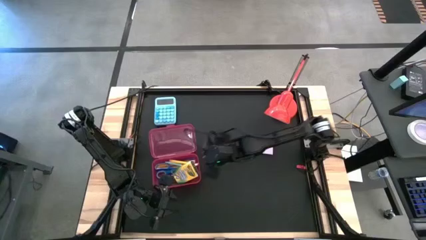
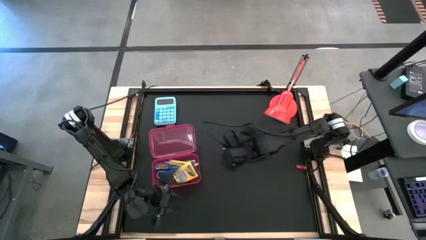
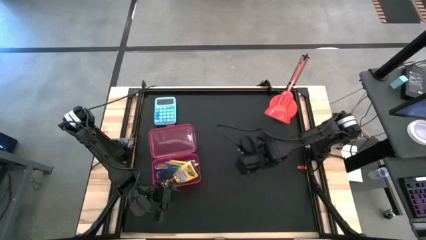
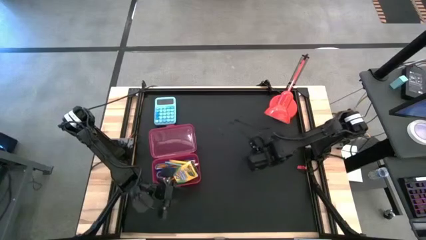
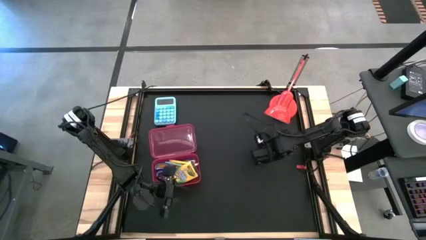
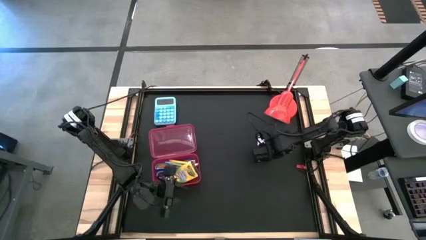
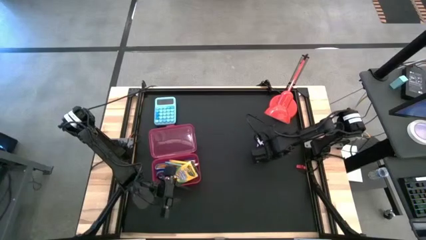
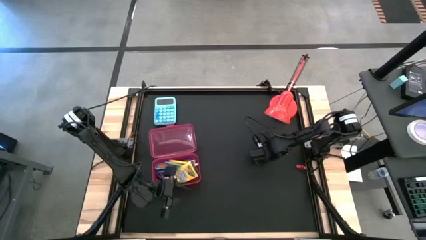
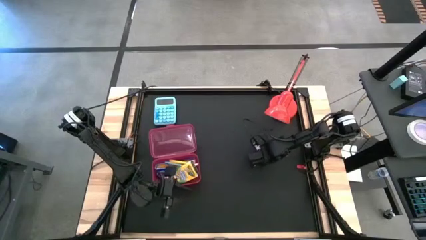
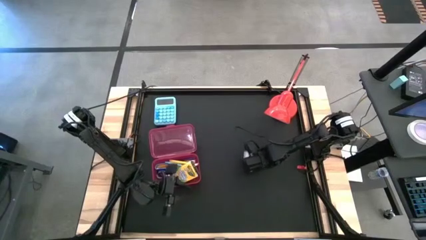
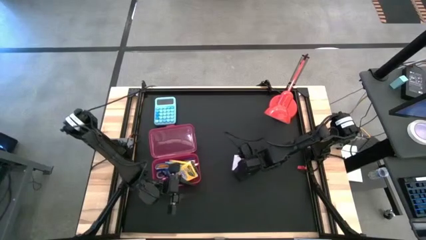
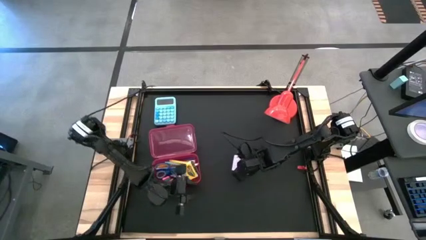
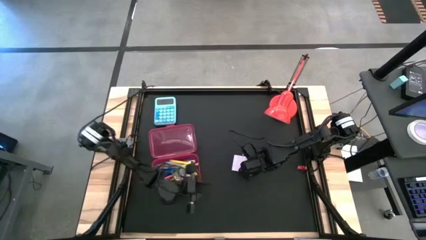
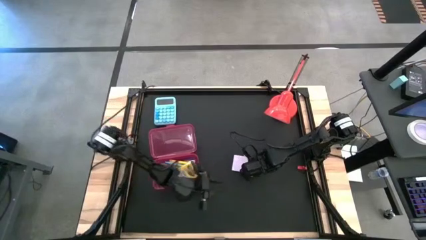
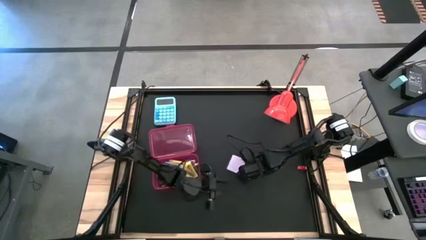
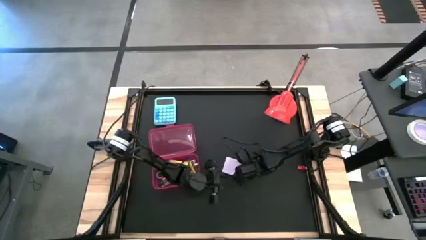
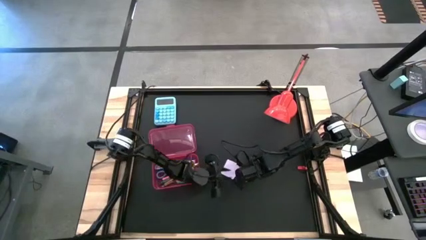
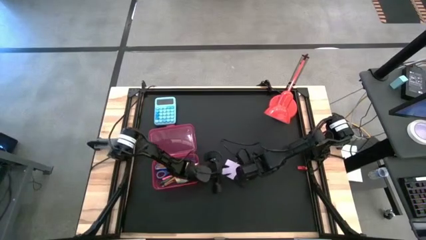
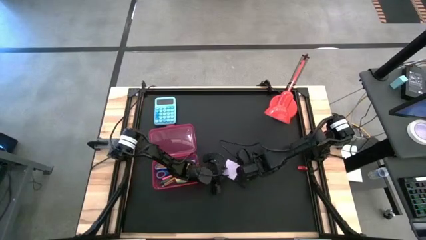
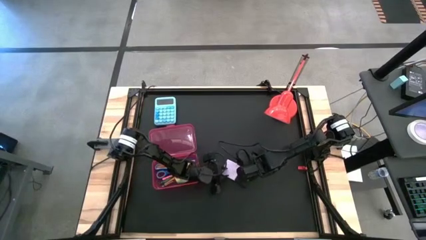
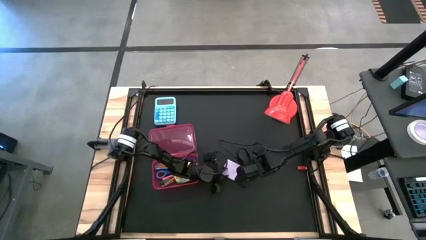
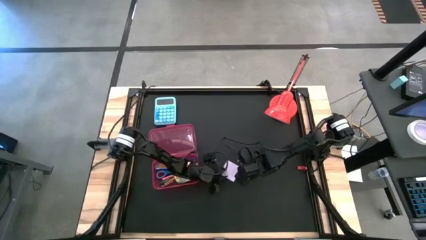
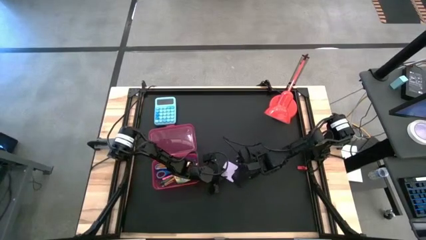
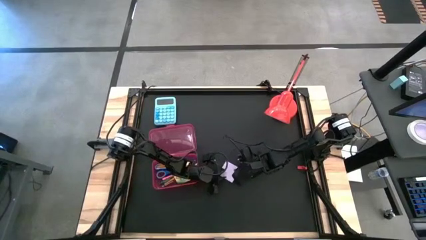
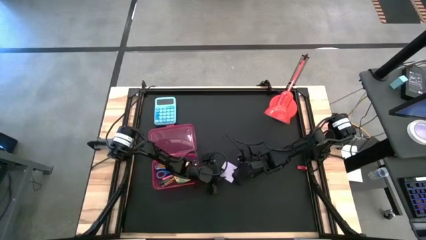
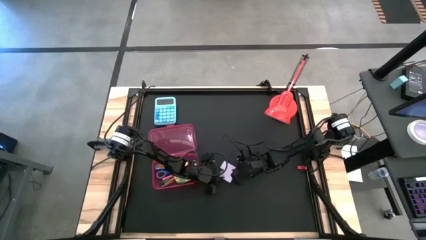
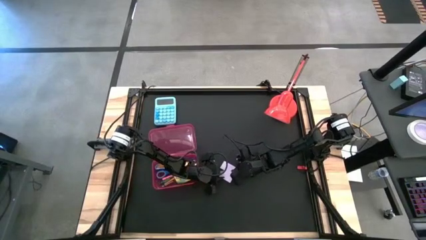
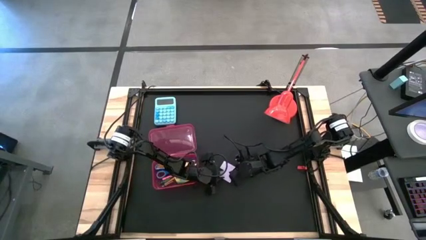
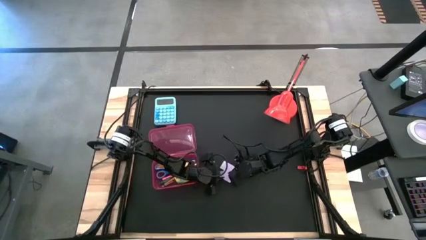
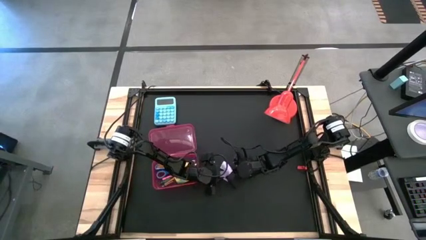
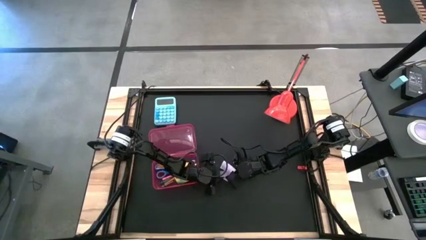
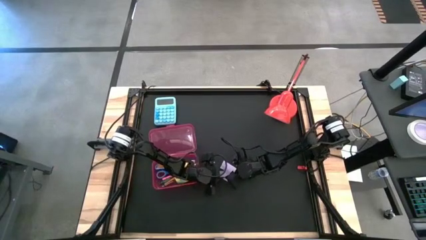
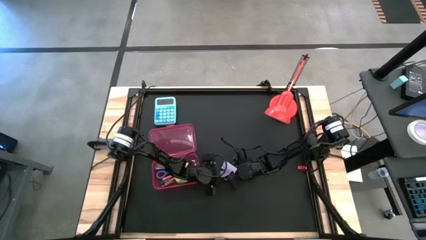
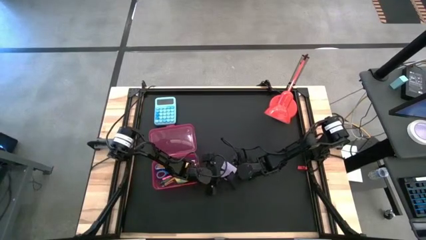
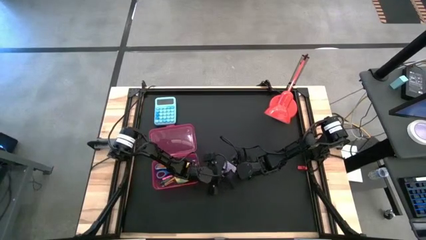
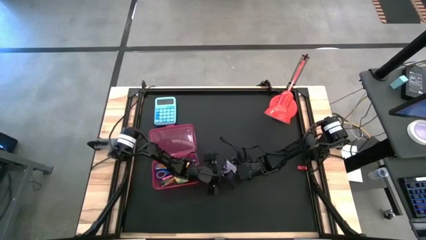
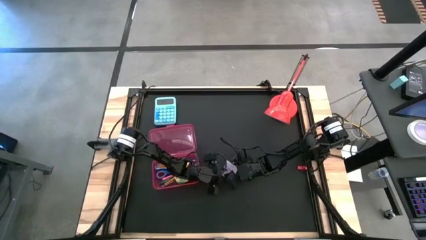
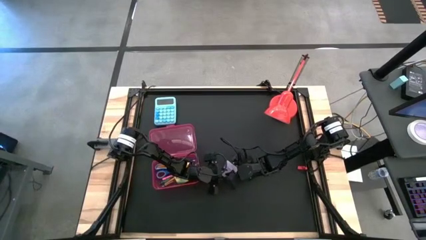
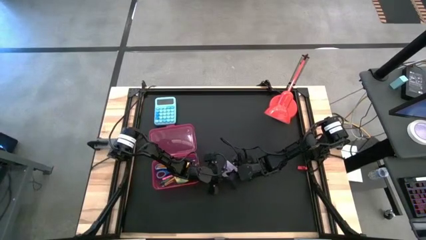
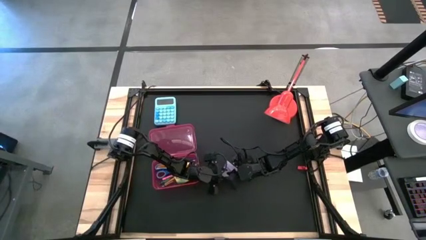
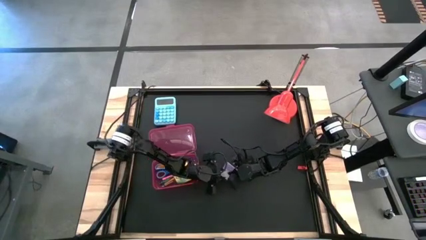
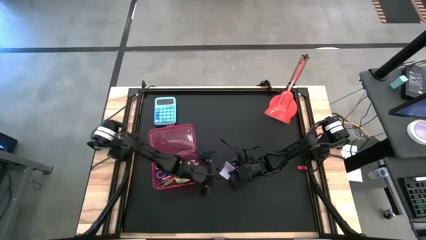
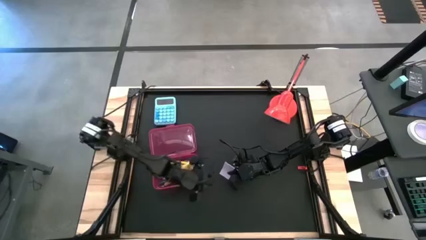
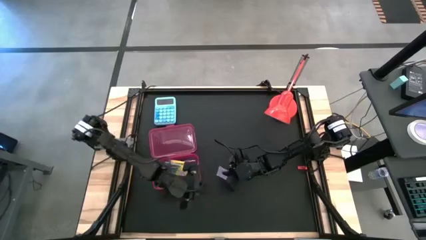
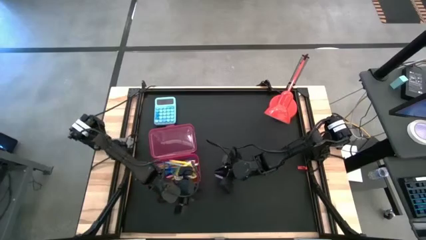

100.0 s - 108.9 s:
Task: Pack school essentials
Put the white sticky notes into the pink supply box

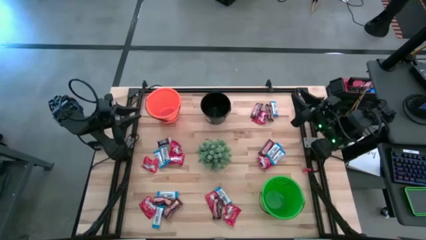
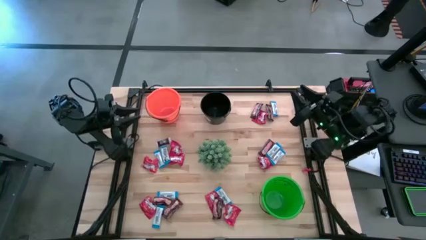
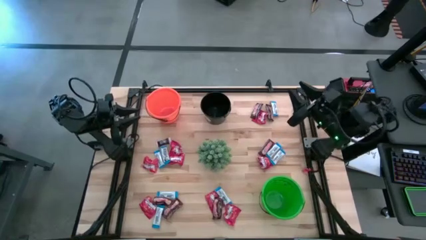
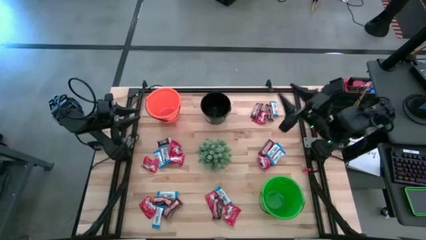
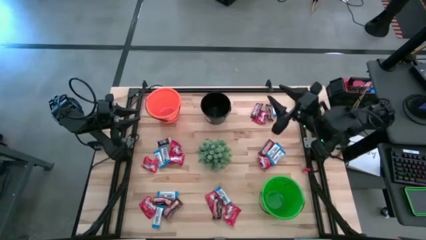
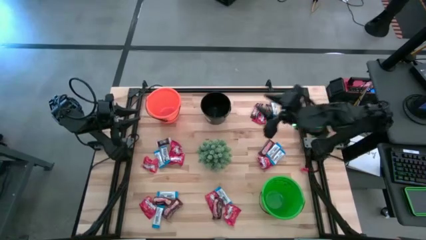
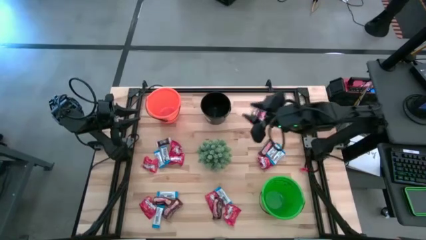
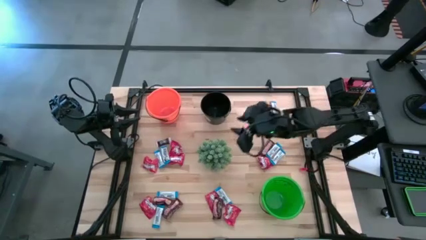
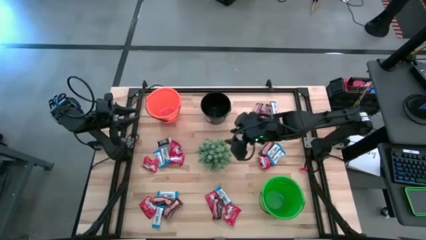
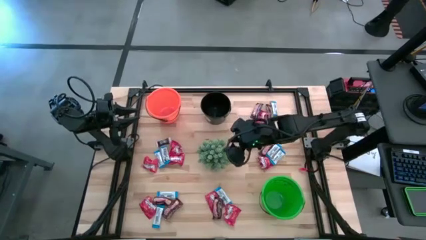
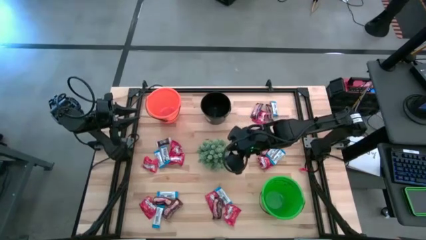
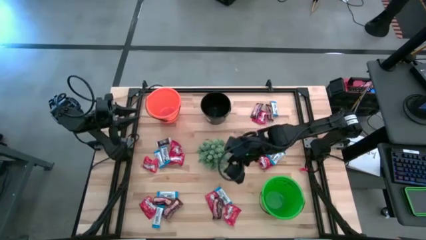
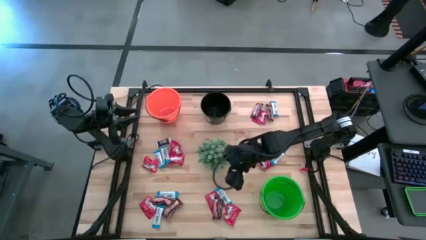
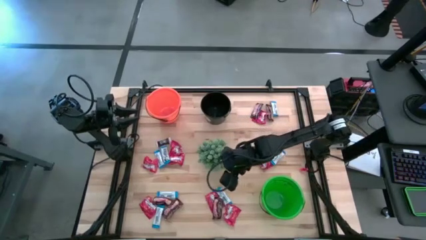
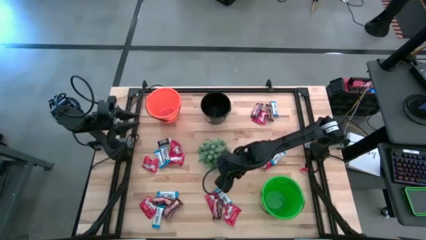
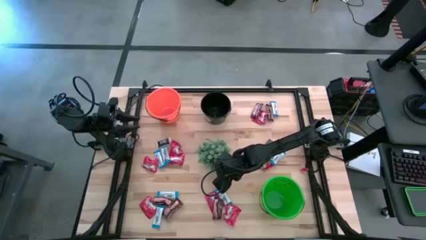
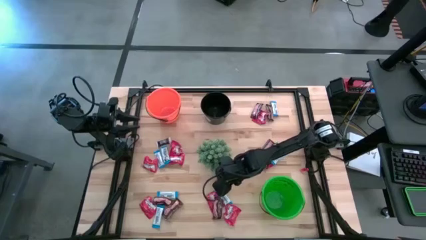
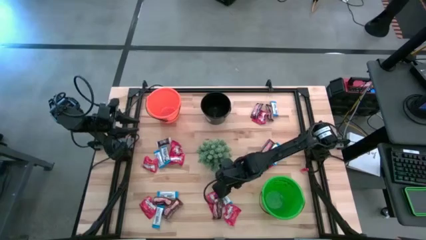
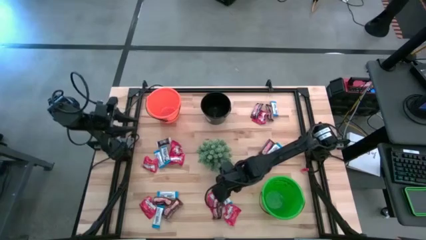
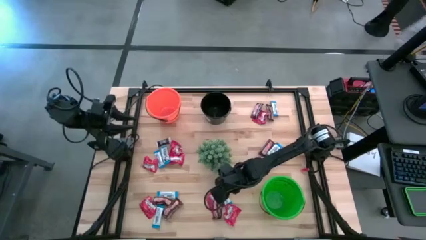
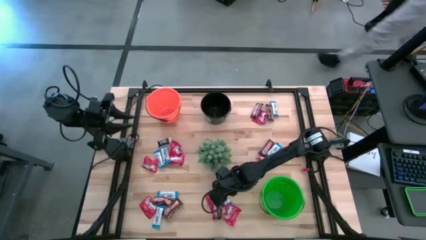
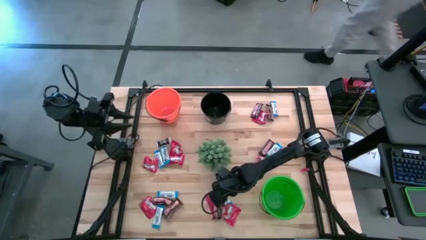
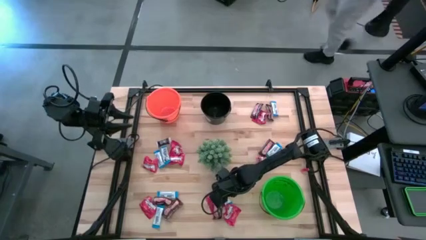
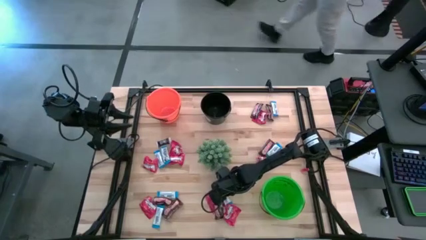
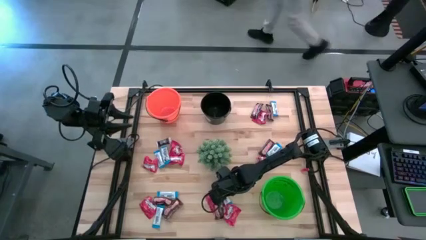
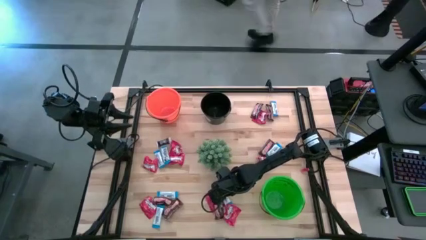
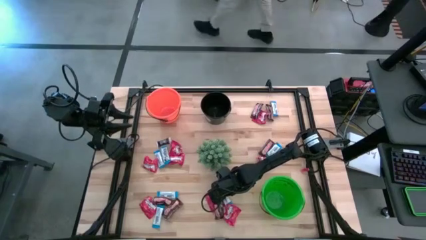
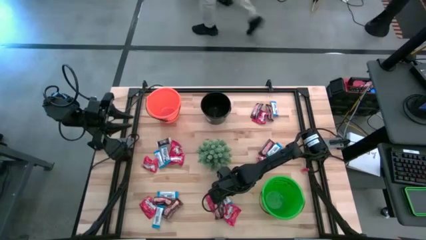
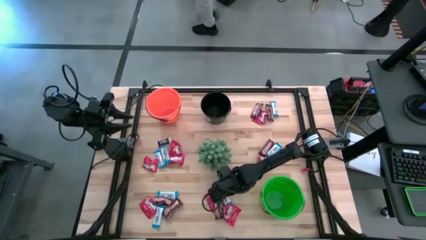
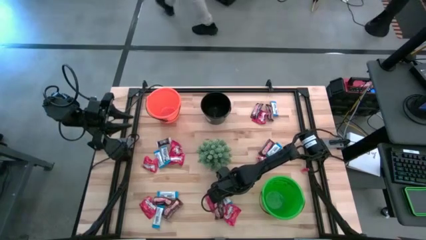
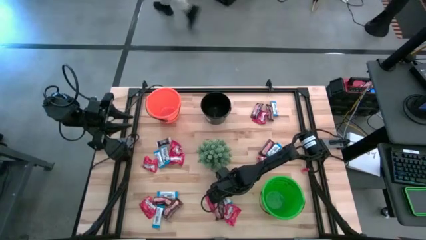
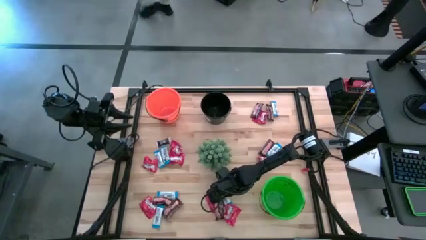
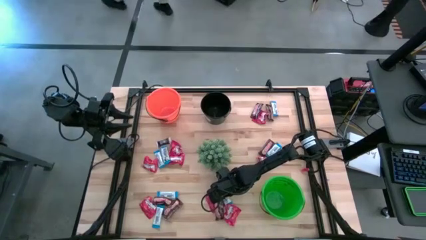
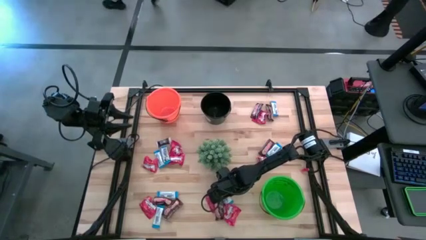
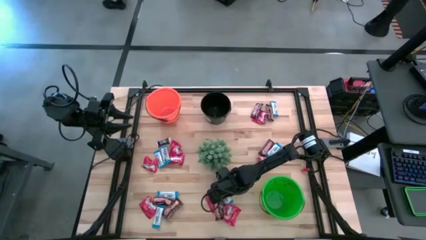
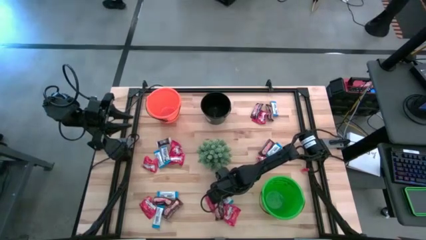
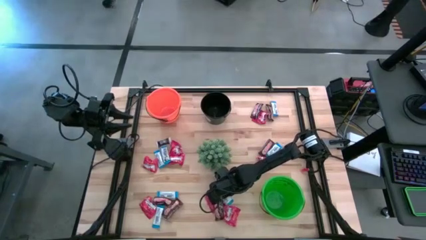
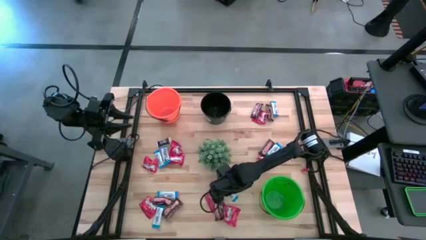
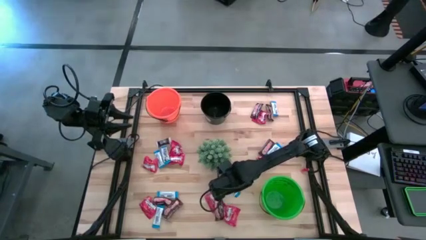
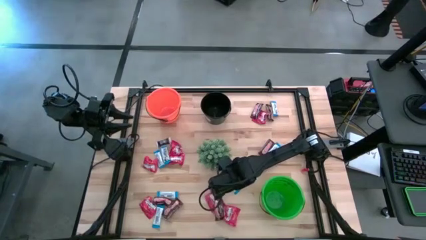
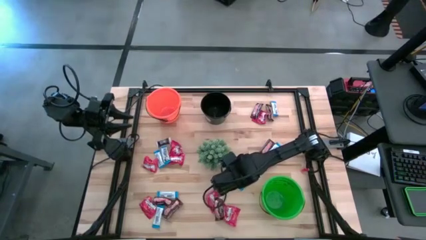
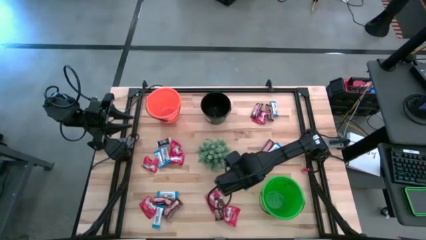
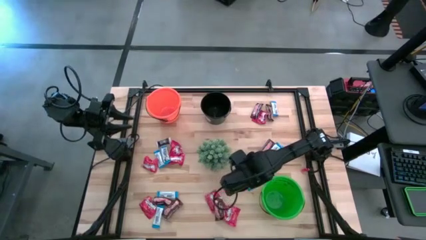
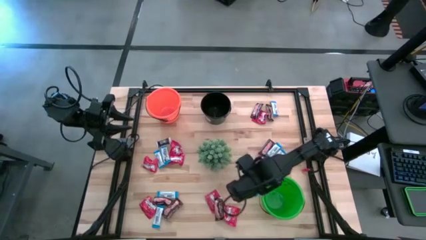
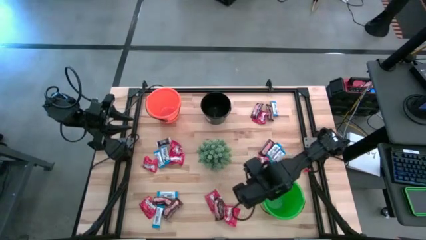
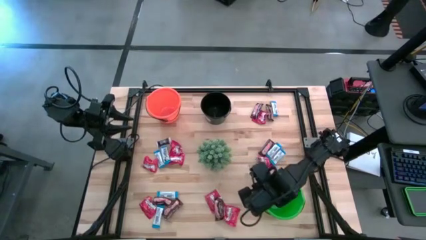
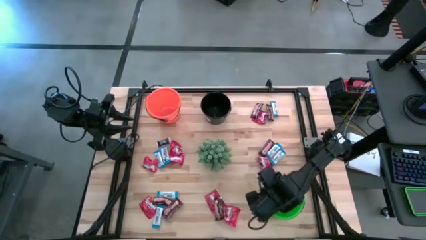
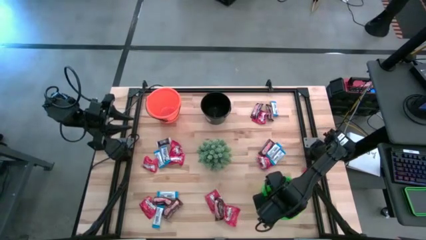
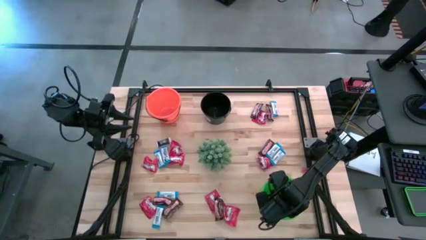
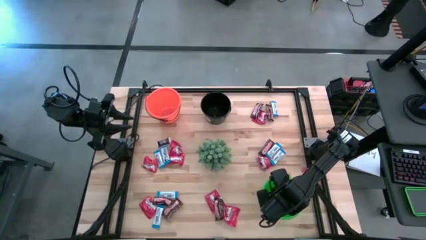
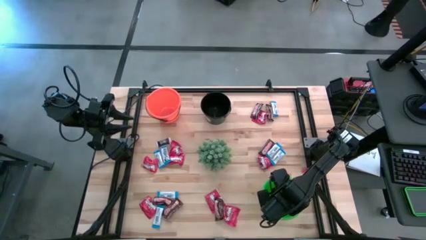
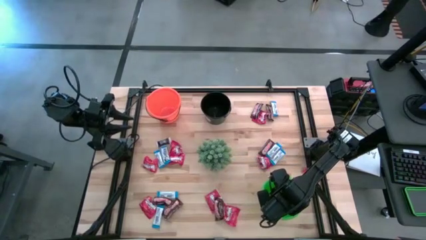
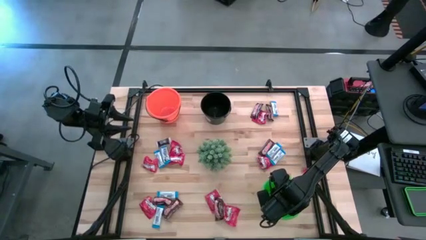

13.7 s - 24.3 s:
Task: Sort candy
Put the blue chocolate into the green bucket
